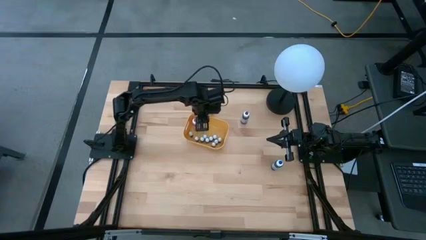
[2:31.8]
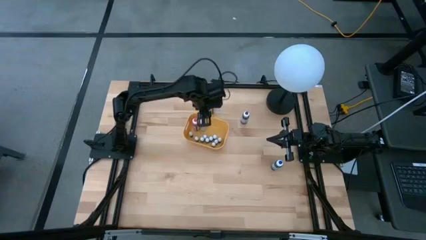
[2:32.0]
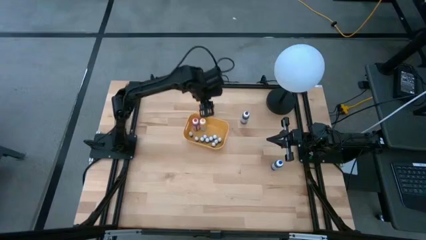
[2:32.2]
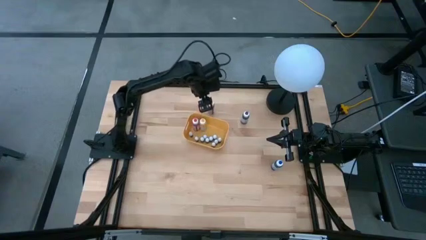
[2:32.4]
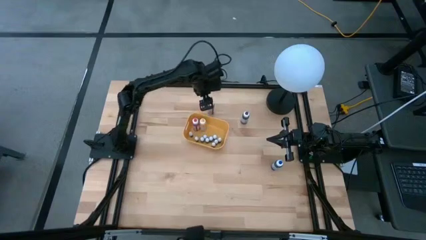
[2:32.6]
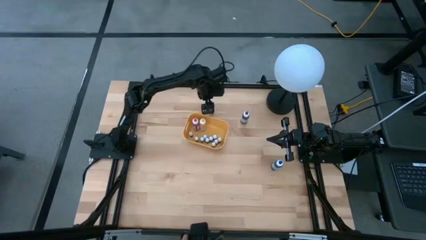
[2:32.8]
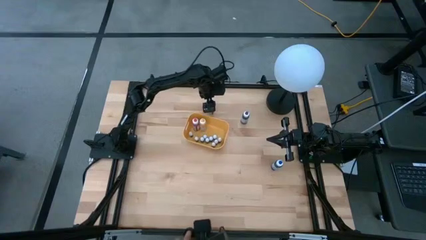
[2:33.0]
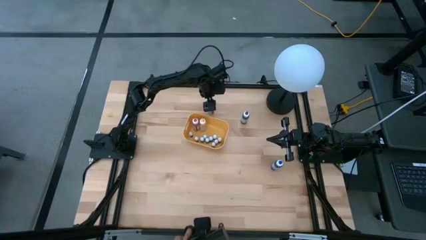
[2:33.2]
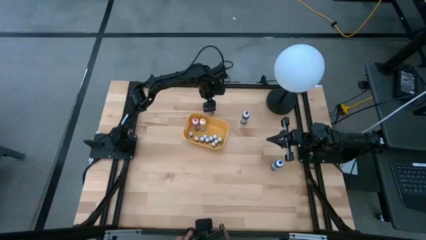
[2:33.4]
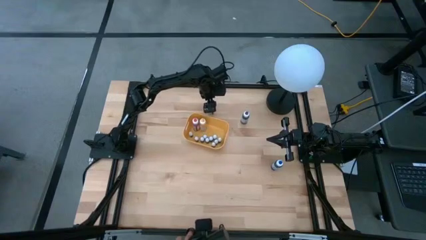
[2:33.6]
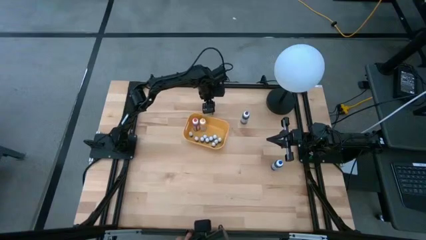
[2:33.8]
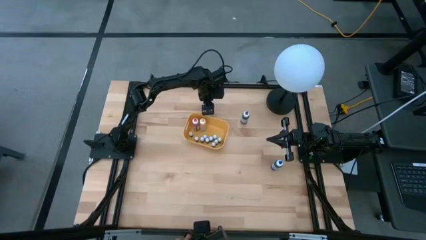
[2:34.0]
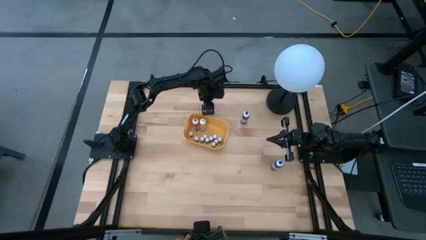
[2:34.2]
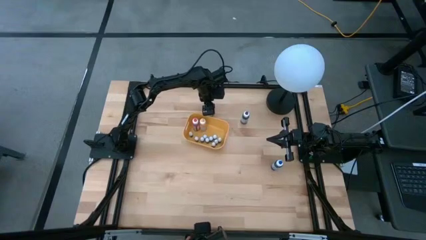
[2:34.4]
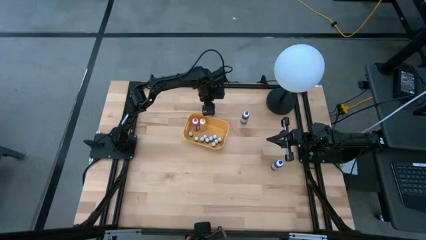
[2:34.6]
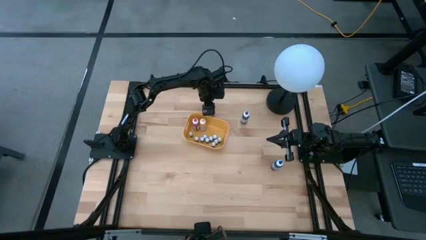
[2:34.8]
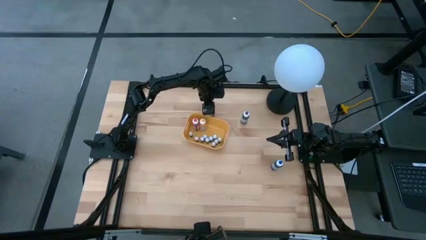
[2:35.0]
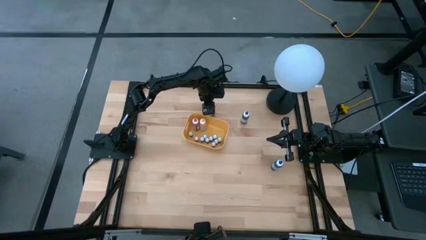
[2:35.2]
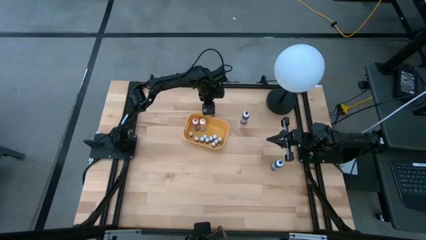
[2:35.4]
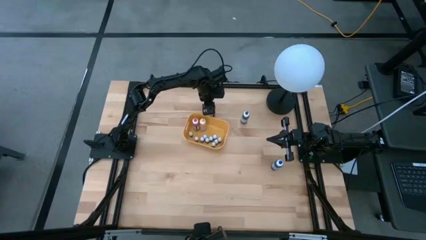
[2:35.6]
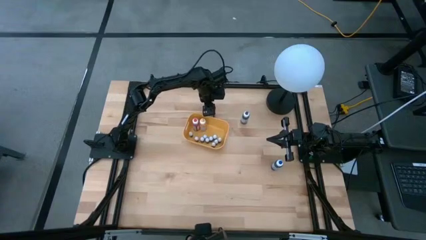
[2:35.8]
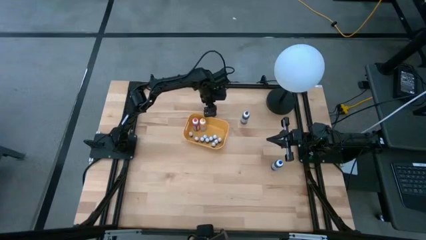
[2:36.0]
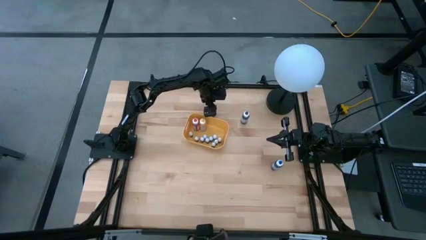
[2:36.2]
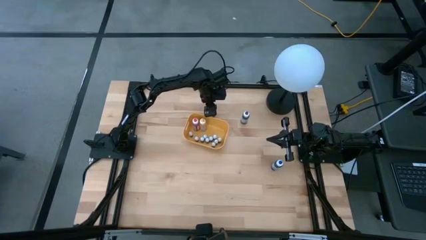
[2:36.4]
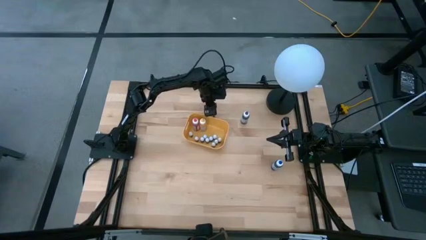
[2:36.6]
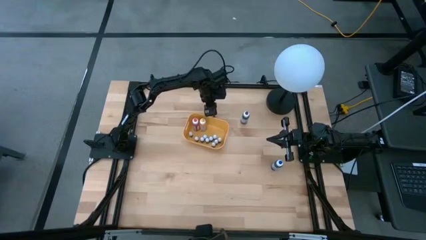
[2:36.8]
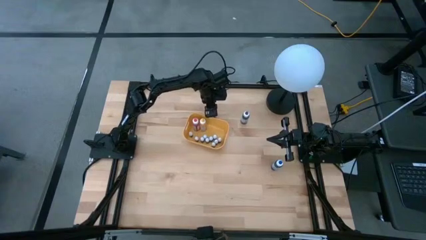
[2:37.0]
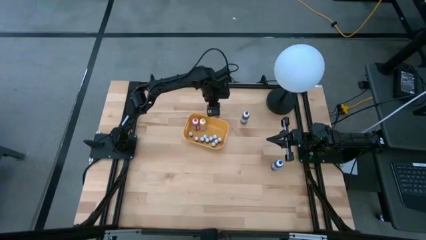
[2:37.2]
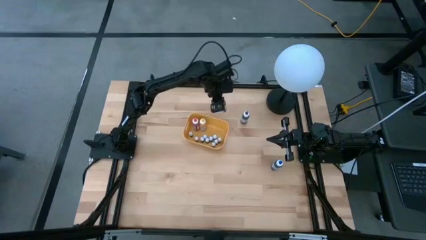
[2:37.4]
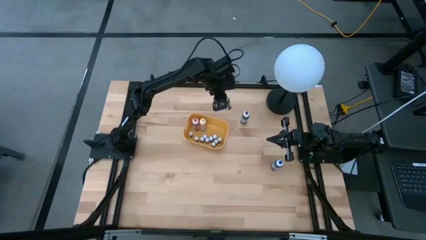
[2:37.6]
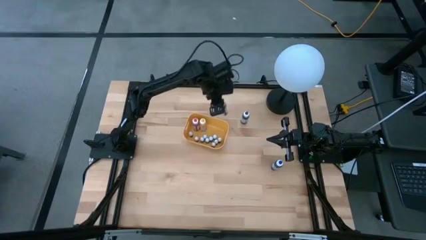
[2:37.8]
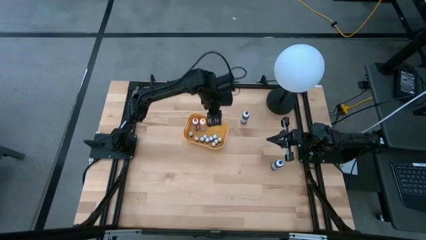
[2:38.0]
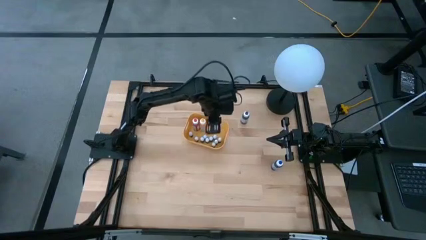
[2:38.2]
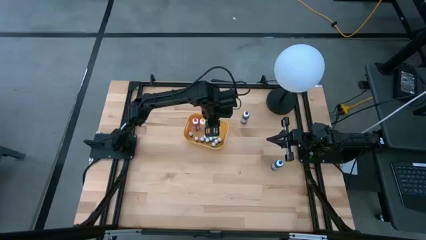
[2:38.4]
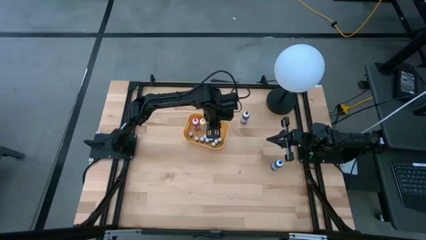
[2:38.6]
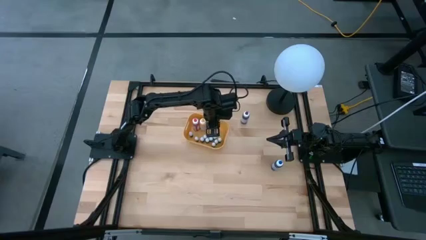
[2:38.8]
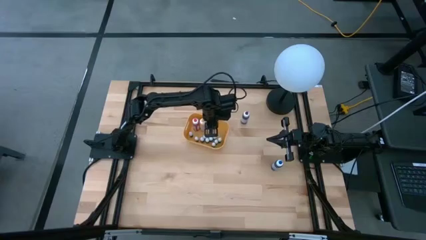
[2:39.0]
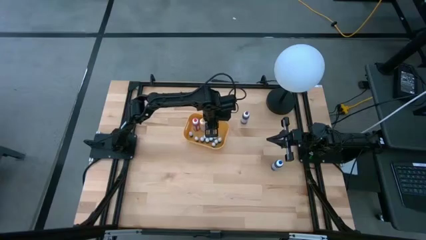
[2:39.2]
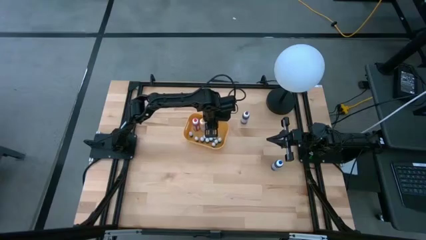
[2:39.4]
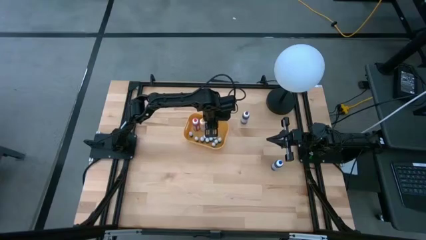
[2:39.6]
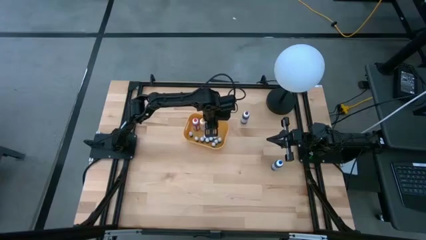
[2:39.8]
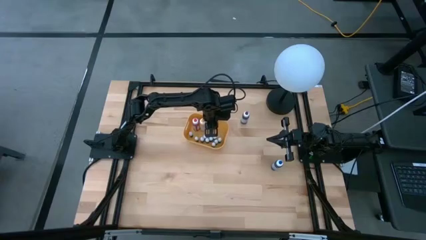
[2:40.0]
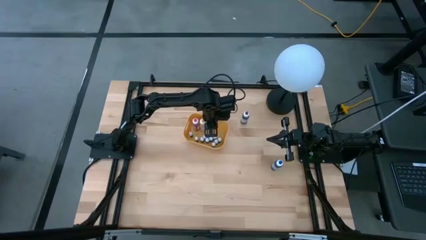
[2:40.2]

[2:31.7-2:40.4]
Task: Pick & Place food coloring
Put the large red food coloring bottle into the yellow bin

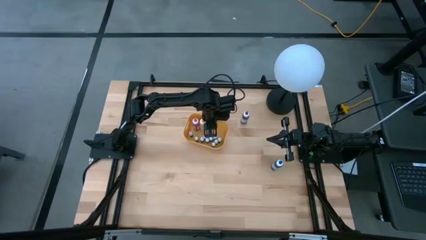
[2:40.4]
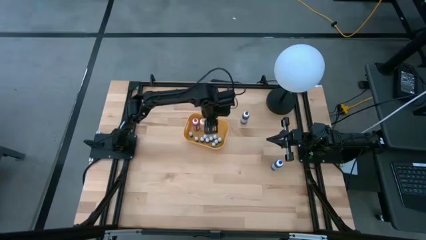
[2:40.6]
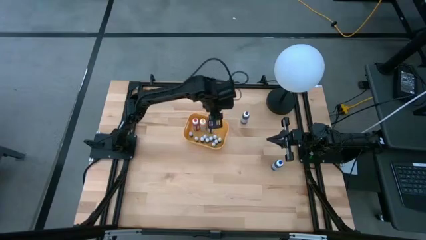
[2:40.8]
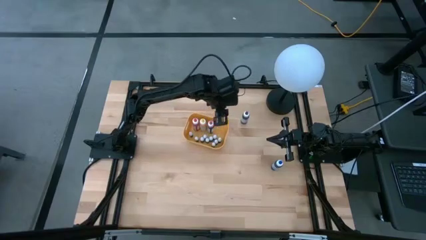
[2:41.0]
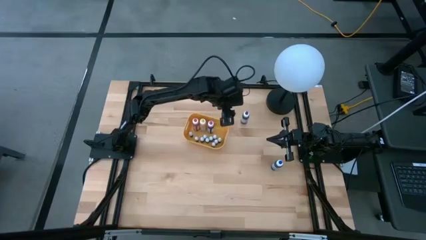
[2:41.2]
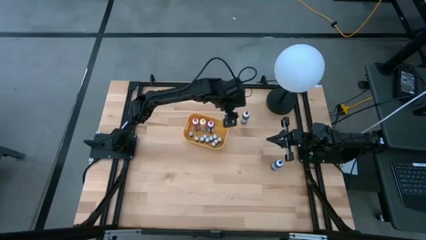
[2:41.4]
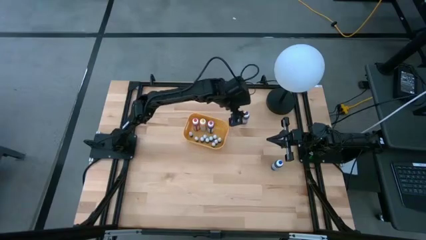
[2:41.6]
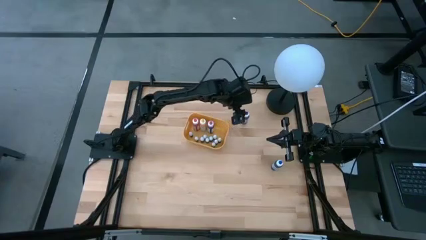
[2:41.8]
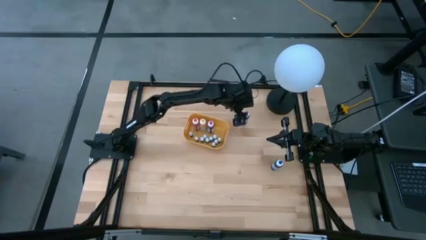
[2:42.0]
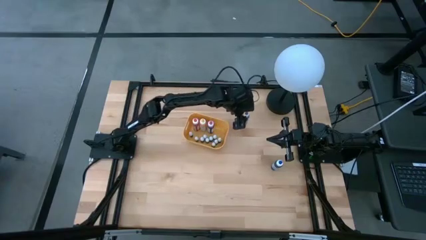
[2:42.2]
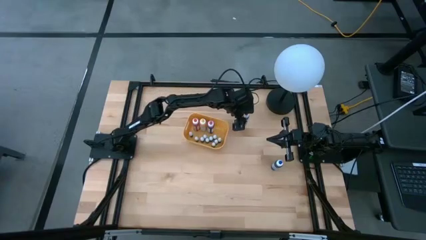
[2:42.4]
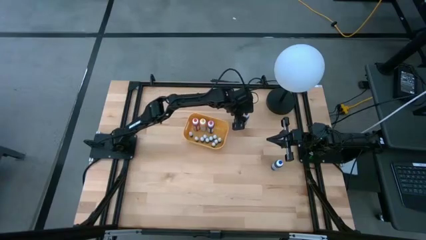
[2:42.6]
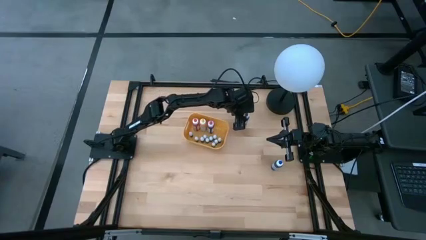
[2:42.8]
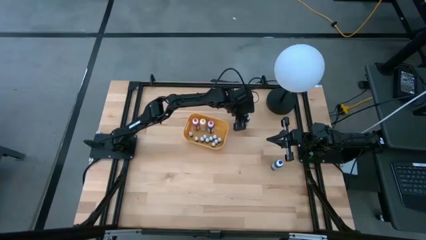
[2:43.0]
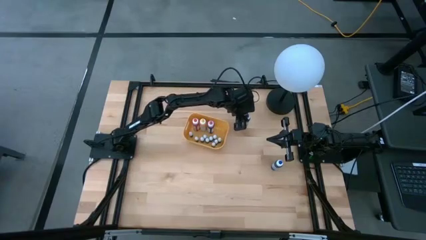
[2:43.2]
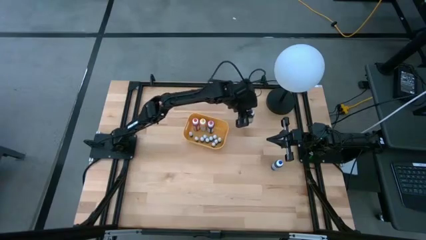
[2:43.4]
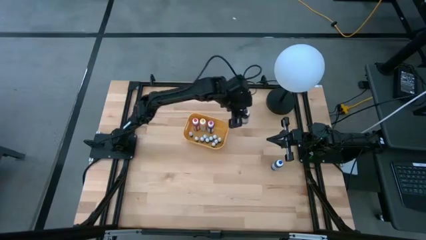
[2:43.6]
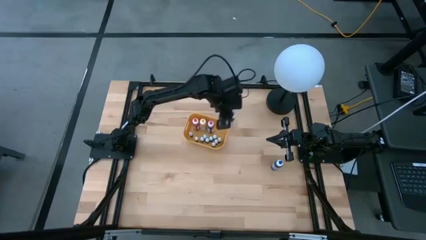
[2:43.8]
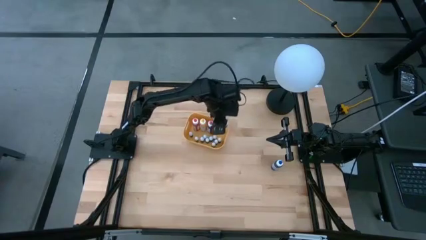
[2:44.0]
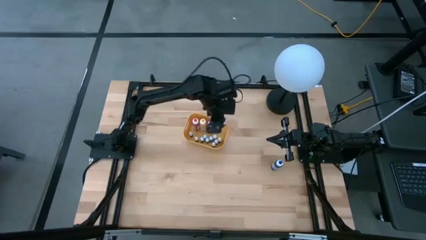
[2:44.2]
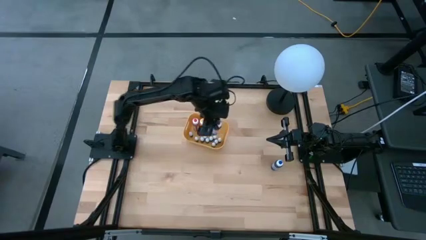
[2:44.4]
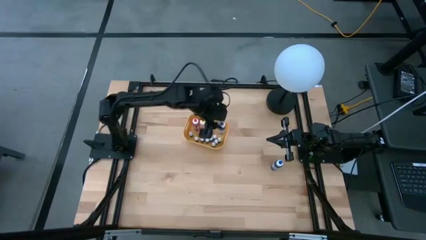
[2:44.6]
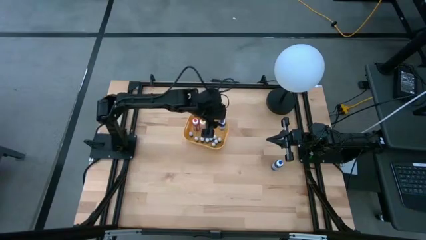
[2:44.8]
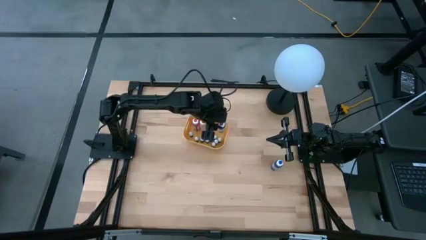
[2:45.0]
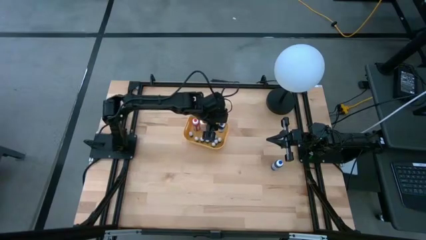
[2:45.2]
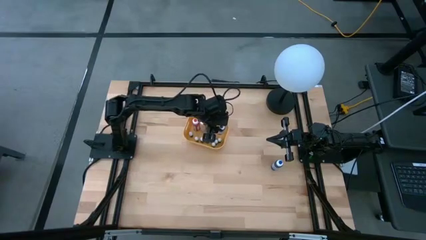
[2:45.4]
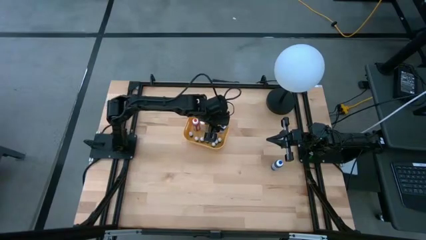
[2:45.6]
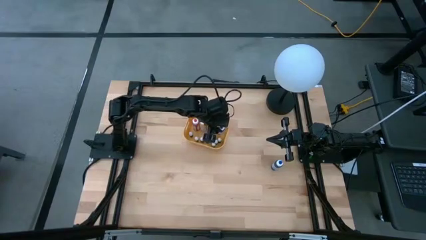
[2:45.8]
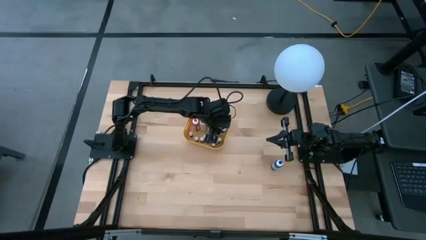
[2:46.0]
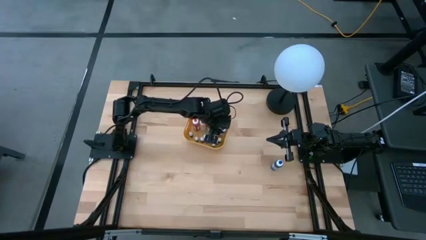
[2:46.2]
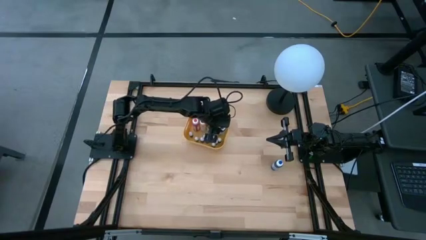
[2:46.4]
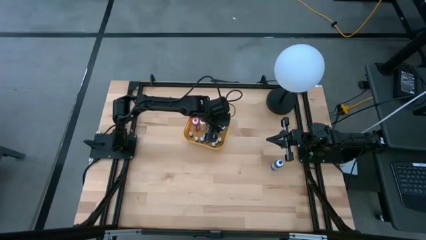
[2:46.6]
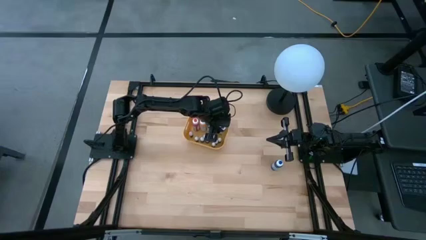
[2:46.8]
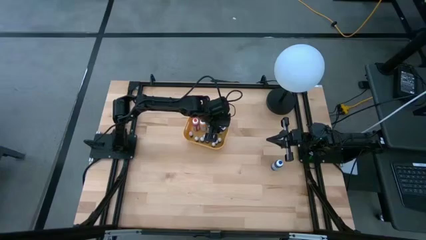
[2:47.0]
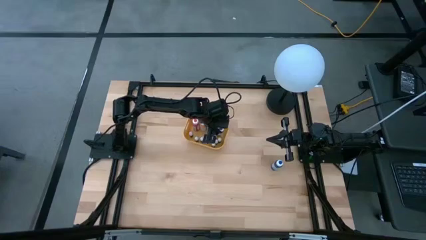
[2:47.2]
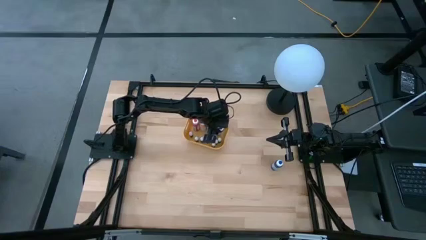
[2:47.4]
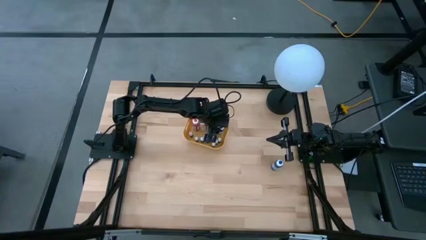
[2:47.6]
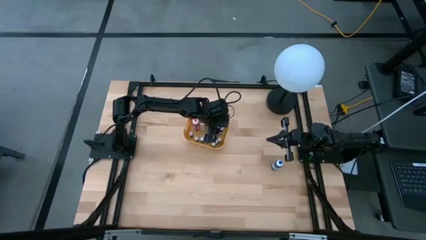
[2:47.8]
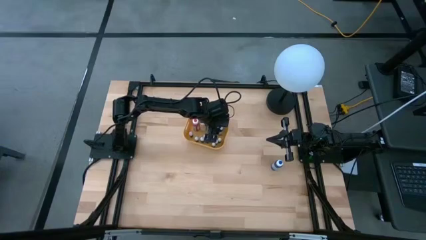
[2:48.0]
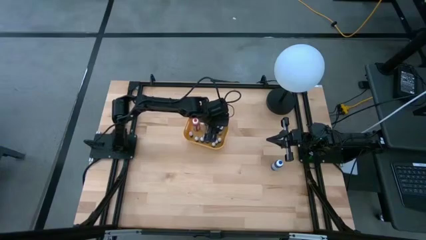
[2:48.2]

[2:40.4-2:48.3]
Put the large purple food coloring bottle into the yellow bin
